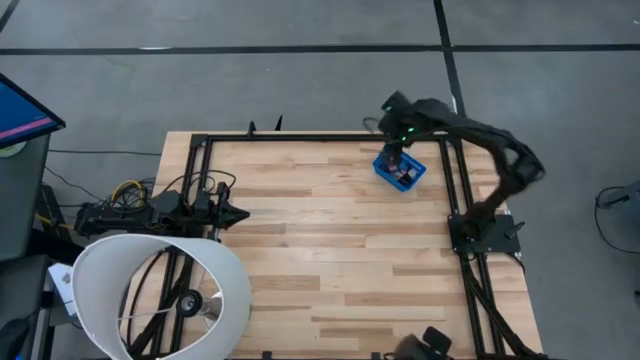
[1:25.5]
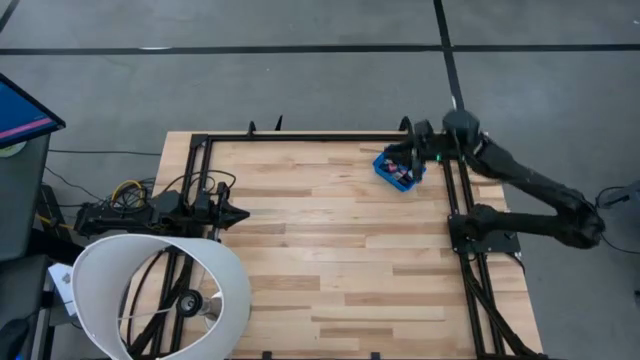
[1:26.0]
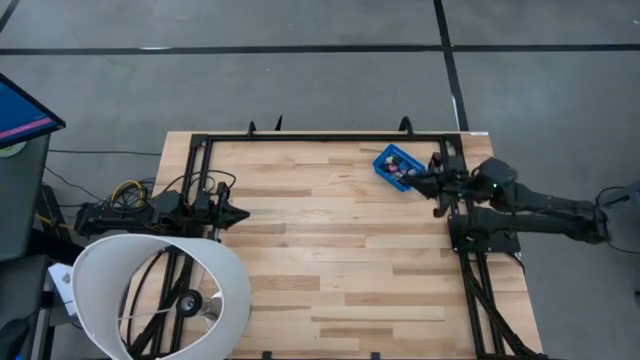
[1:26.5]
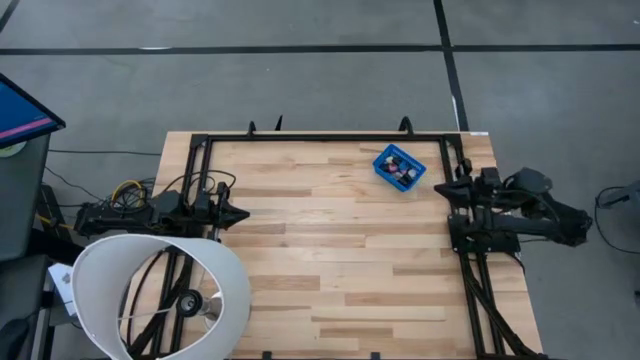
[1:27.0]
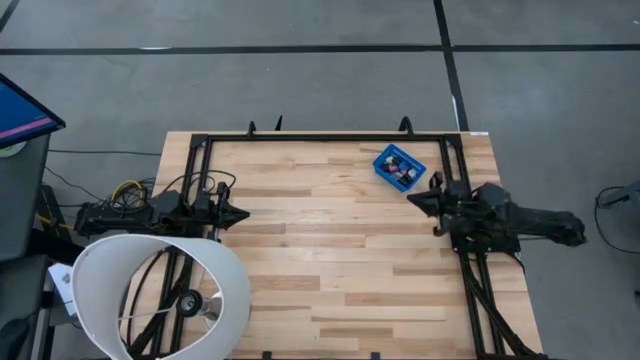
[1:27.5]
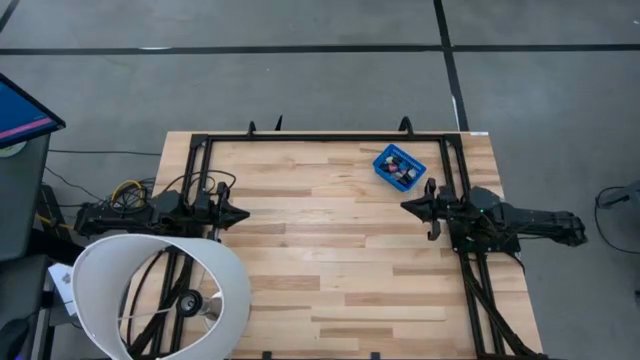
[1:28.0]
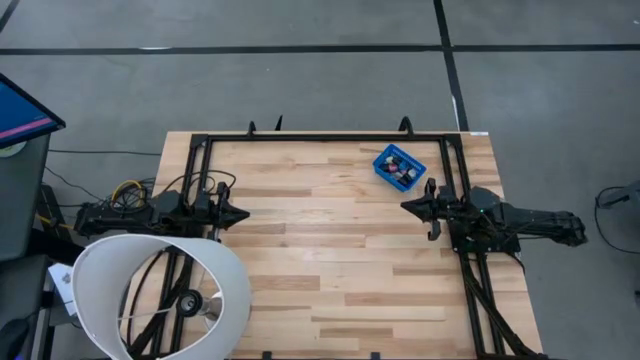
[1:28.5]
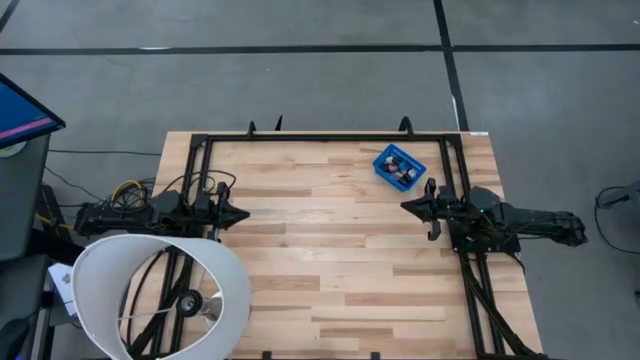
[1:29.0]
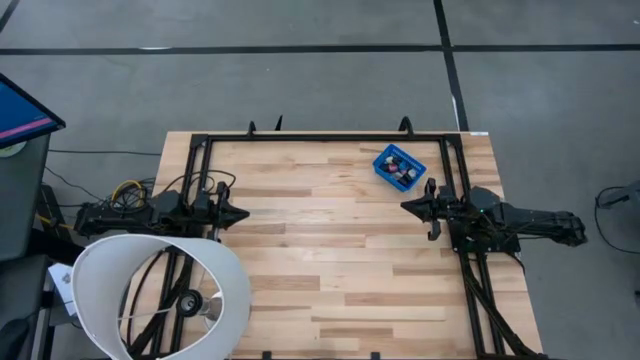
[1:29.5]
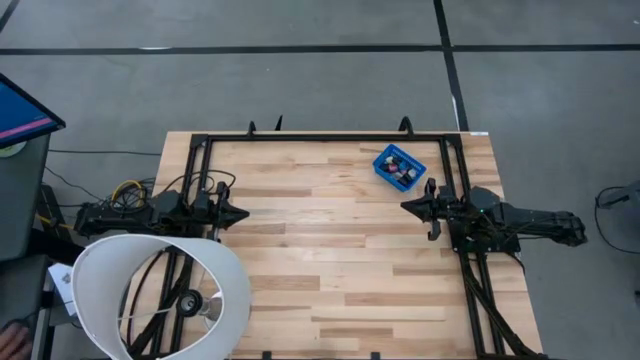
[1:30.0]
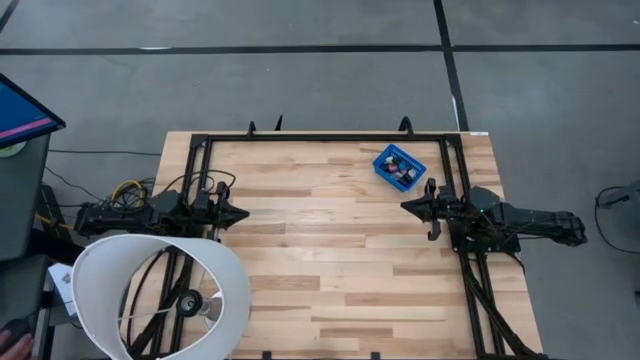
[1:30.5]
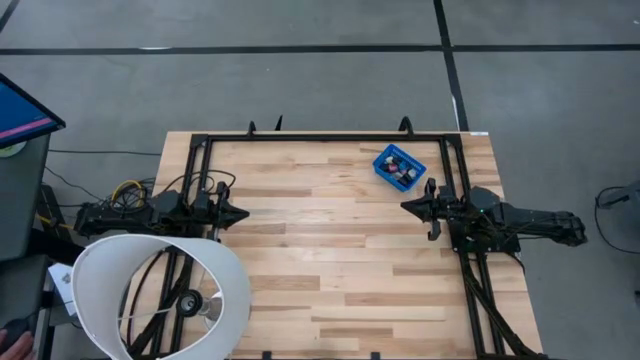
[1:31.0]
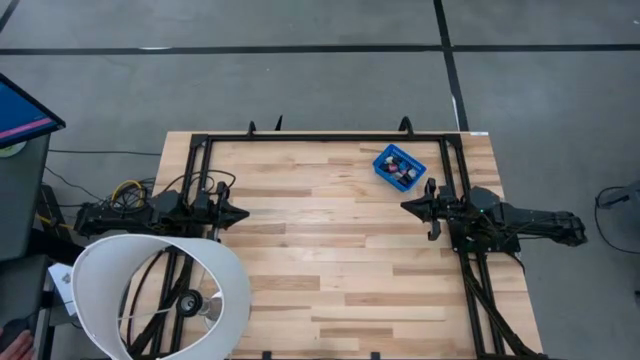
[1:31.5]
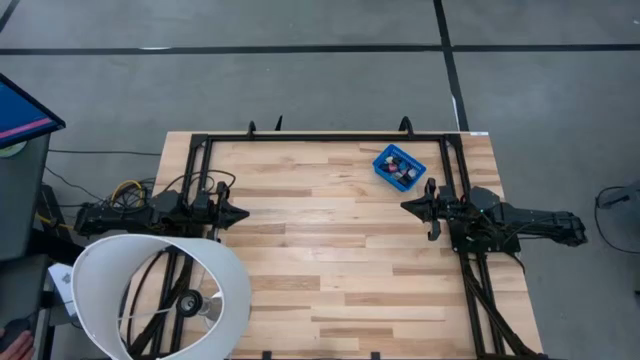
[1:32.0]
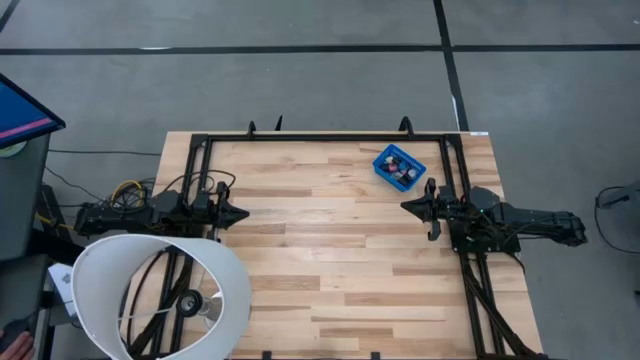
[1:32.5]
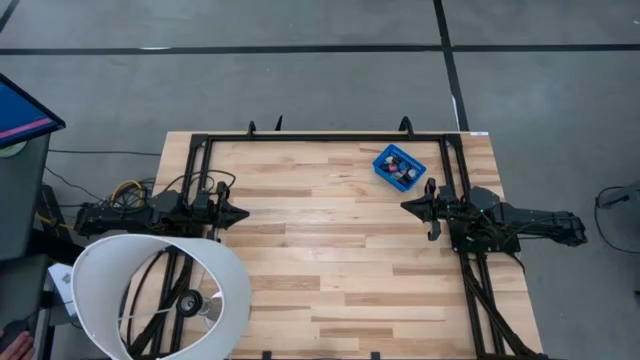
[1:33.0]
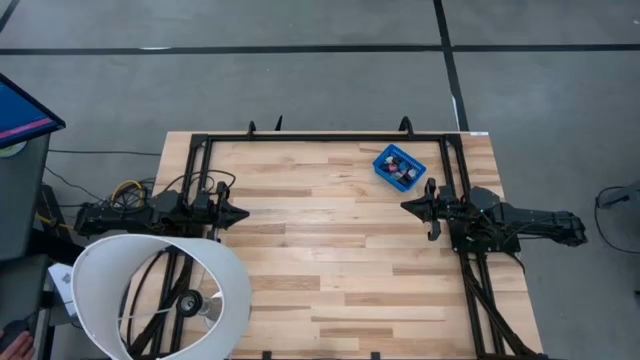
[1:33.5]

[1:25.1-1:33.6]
Task: Pick & Place Nail Polish
Return to Home Position

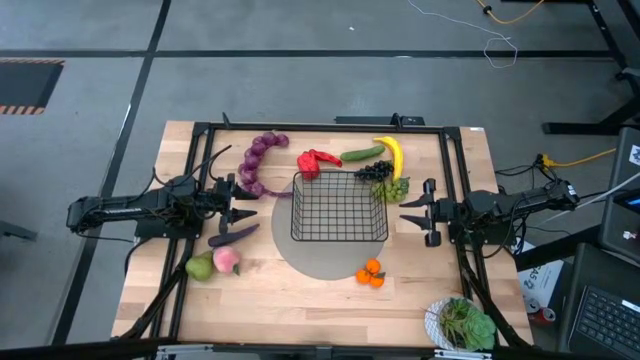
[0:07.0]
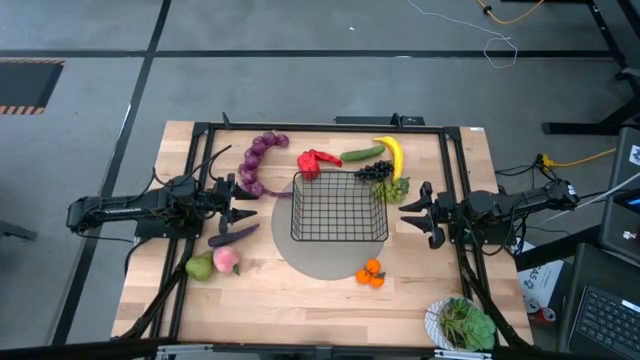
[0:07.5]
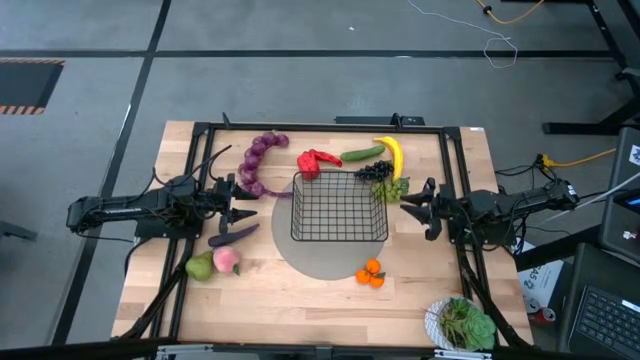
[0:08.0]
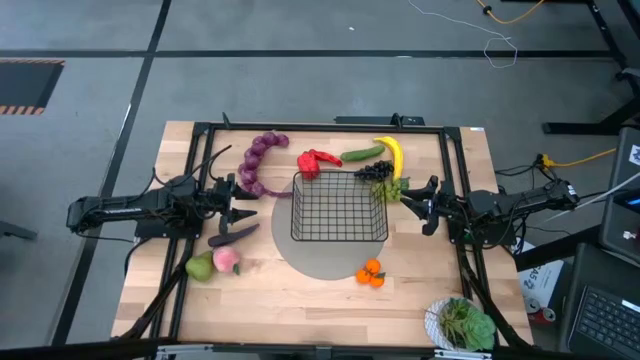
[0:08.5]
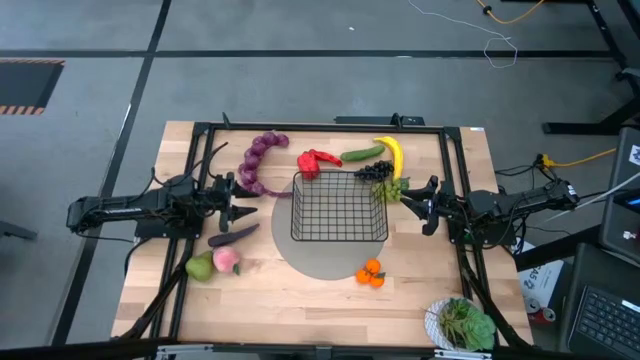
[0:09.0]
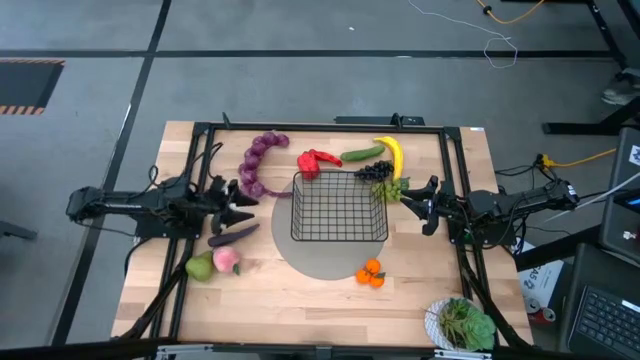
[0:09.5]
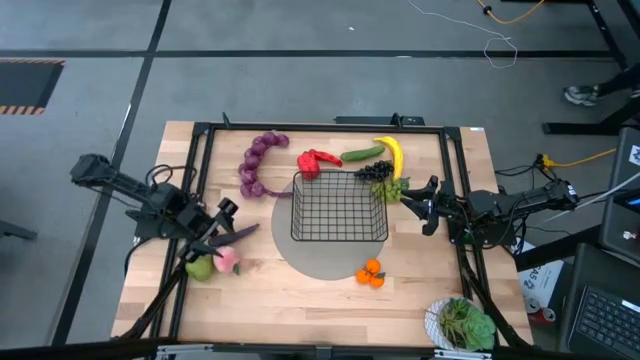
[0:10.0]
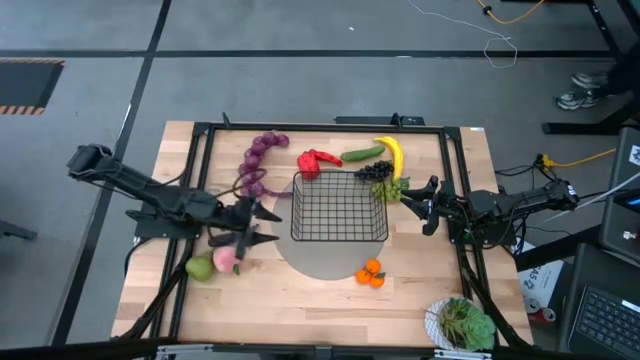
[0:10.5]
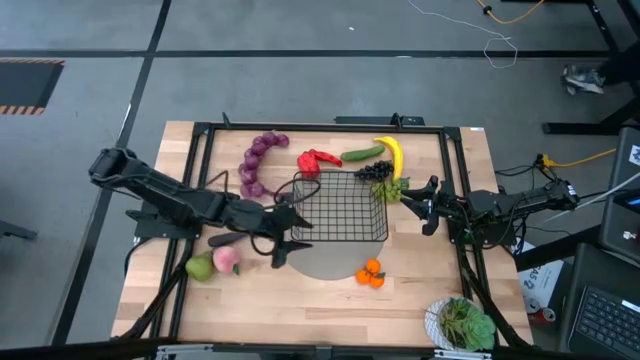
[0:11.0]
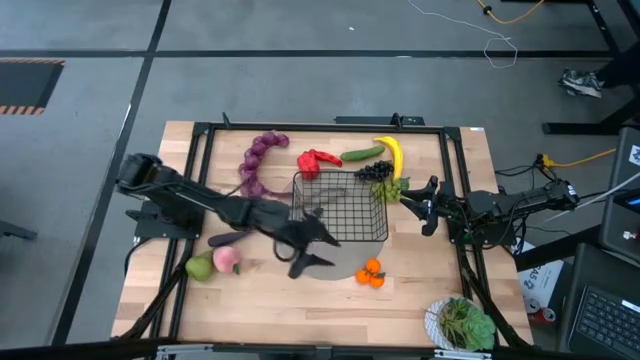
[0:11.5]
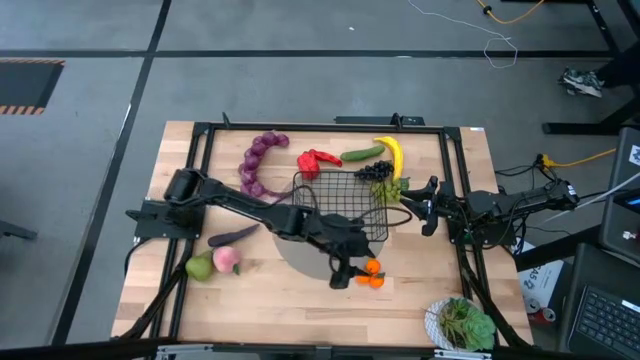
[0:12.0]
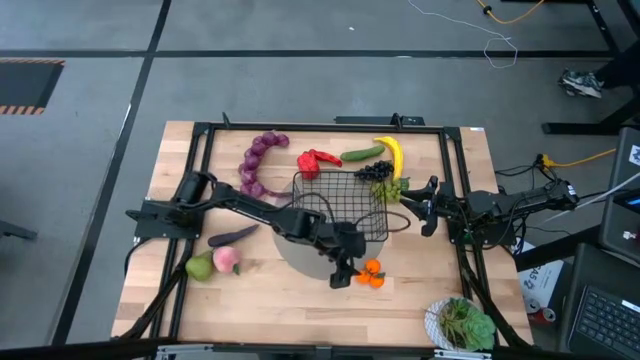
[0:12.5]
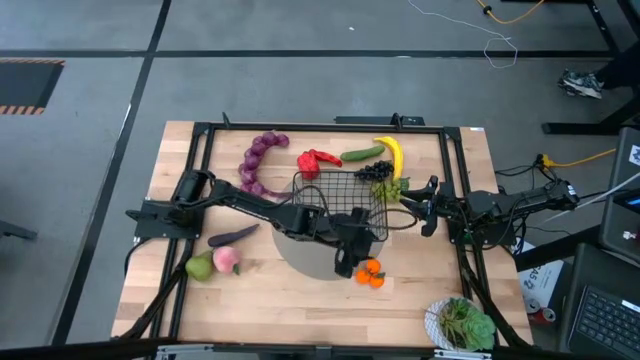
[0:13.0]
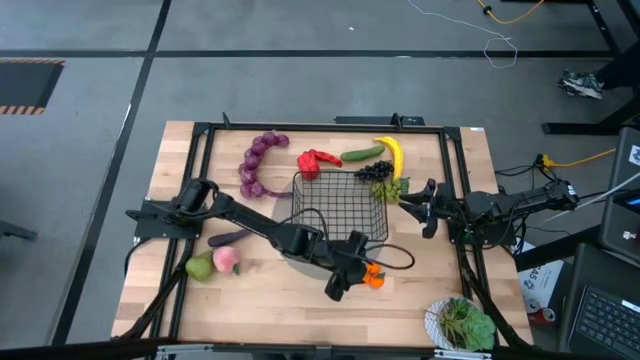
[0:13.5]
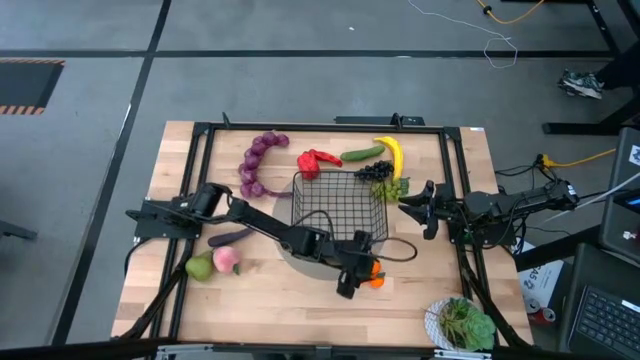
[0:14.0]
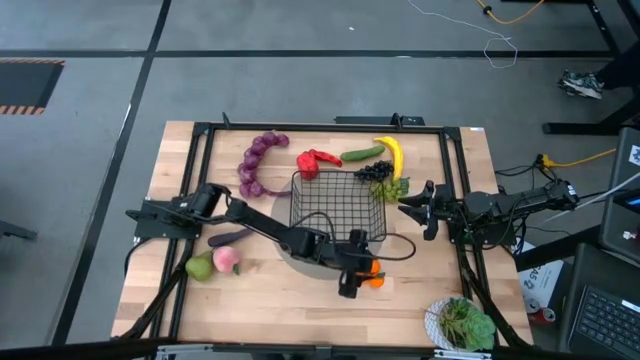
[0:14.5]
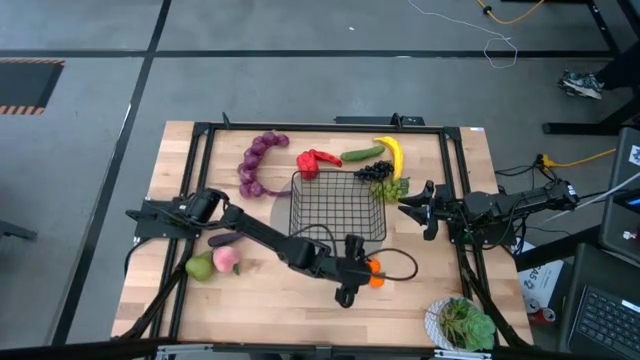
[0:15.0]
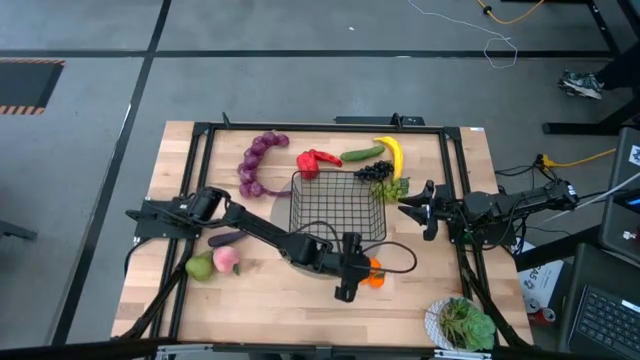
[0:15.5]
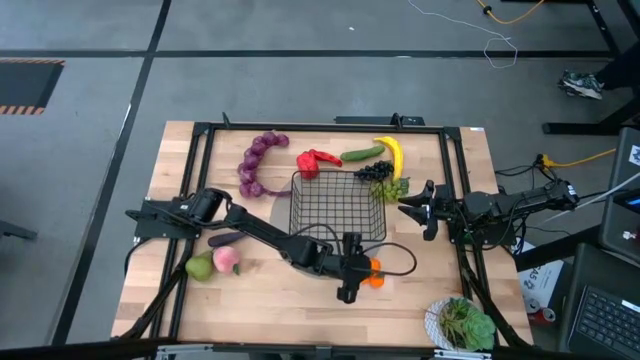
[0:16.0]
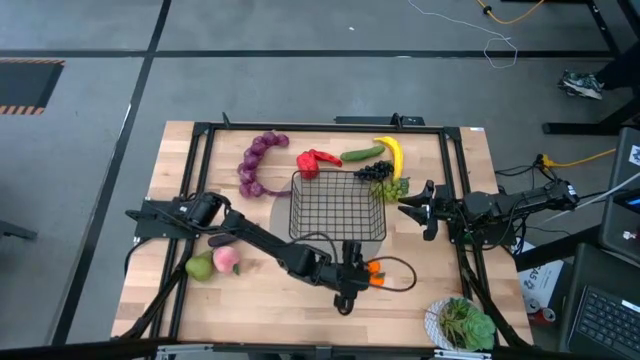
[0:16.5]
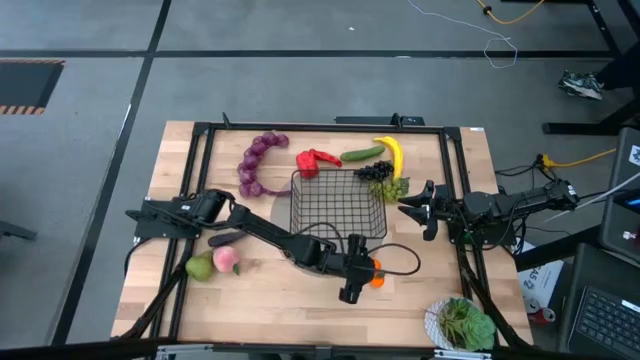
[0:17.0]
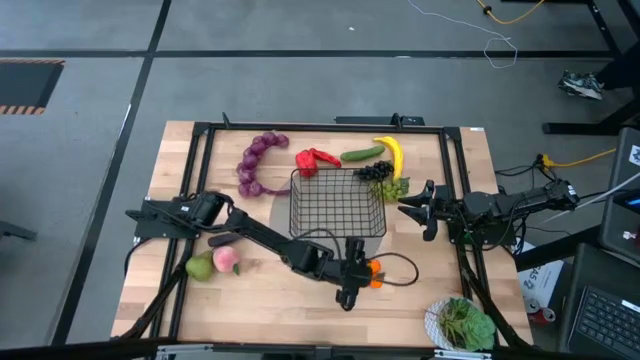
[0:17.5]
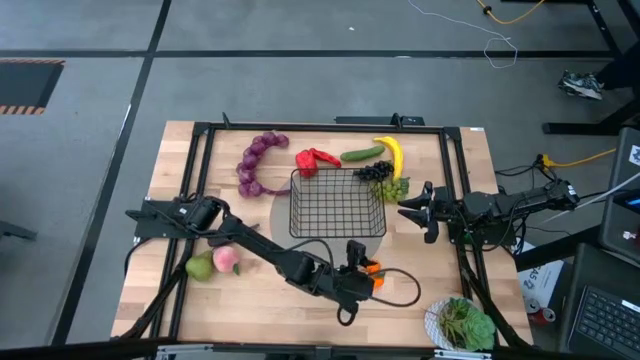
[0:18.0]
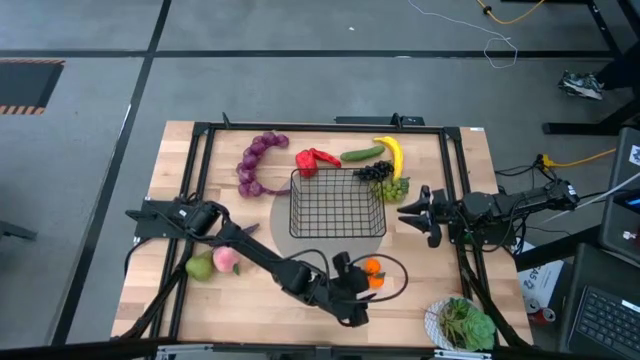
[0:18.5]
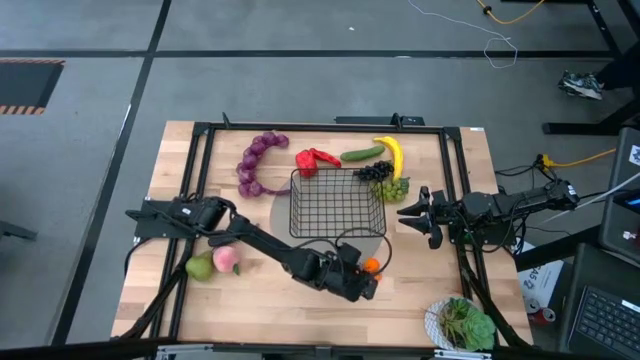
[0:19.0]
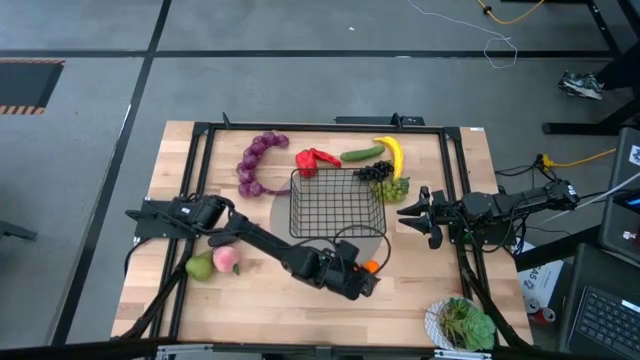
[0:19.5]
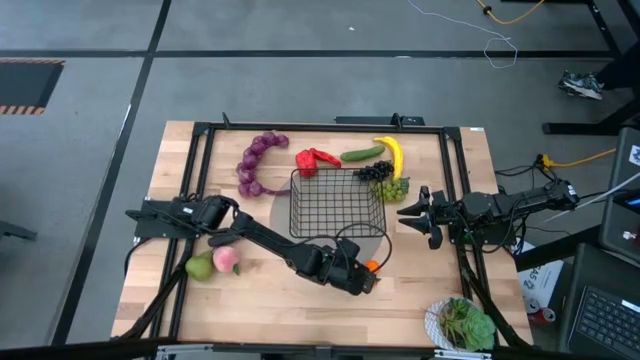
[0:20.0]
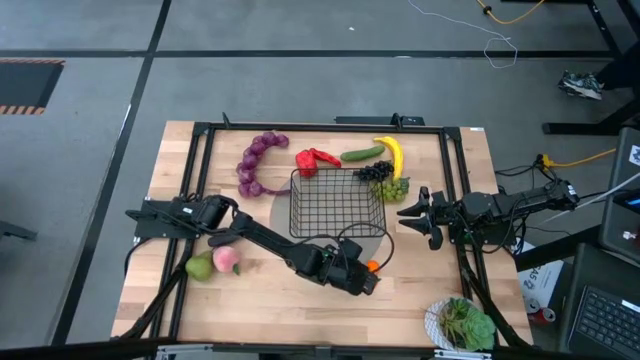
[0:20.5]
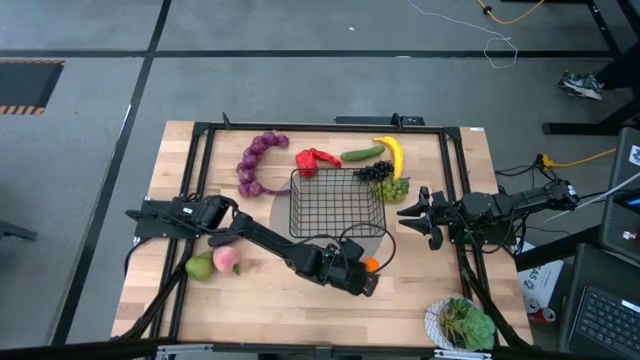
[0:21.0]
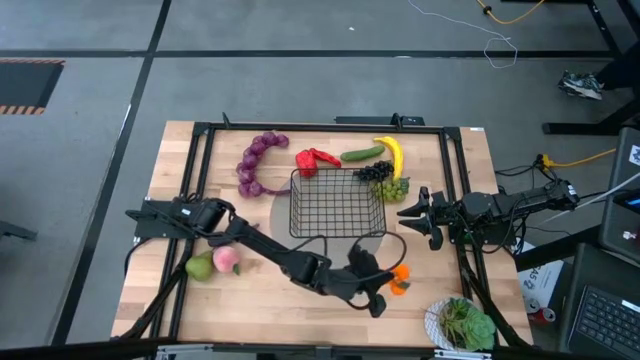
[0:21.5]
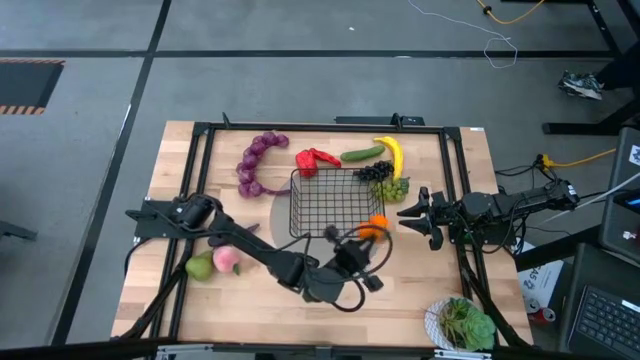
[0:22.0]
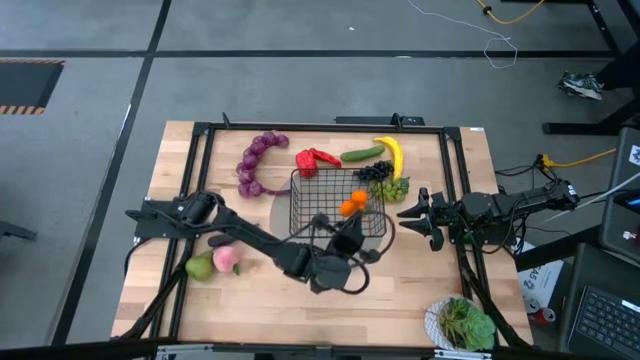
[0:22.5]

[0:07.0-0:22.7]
Task: Build produce basket
Put the tangerine into the wire basket
